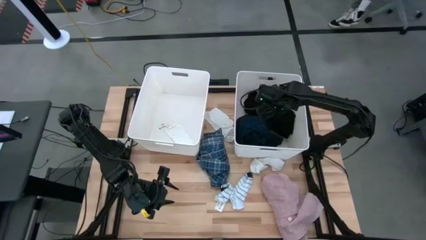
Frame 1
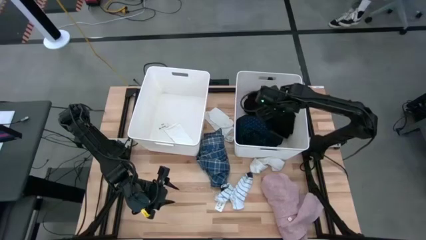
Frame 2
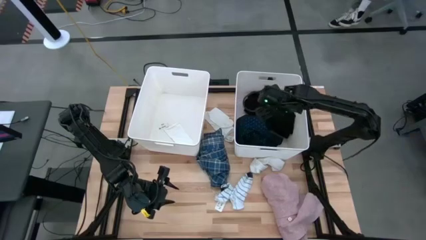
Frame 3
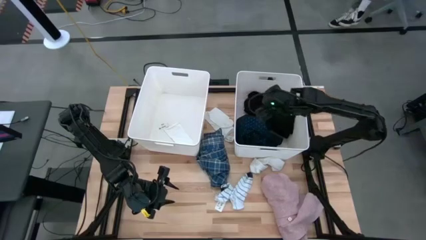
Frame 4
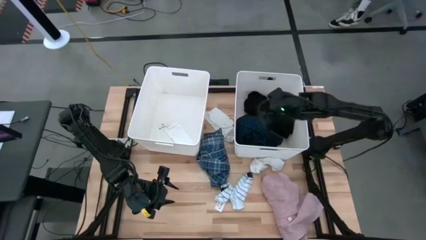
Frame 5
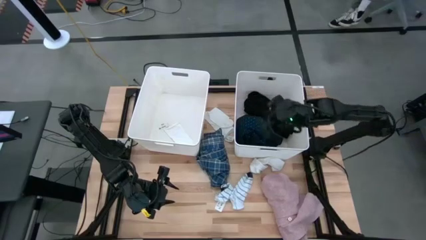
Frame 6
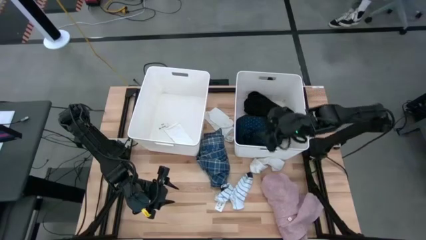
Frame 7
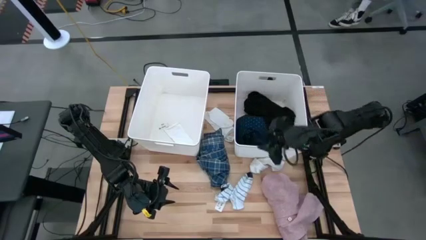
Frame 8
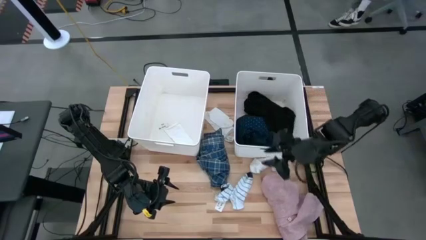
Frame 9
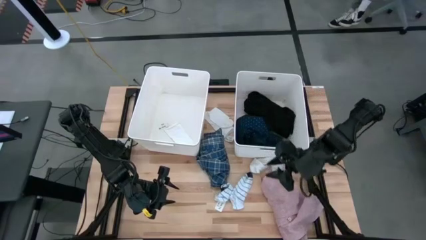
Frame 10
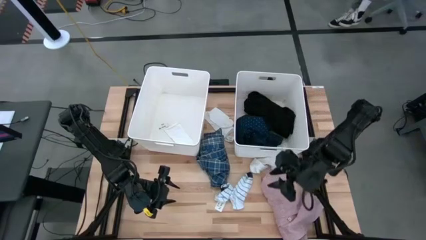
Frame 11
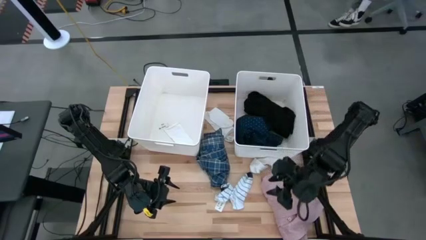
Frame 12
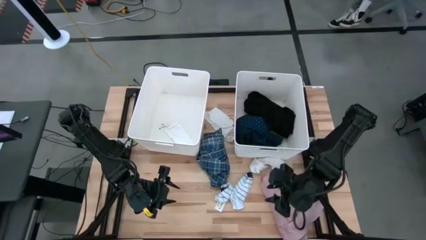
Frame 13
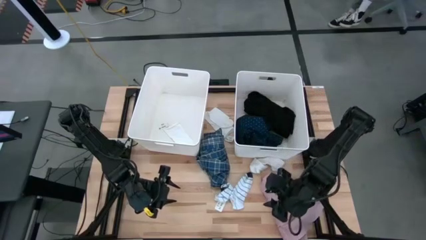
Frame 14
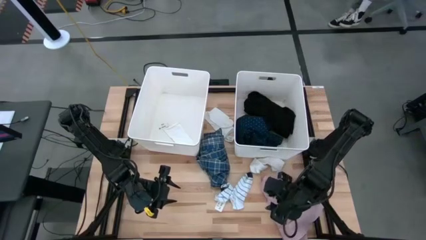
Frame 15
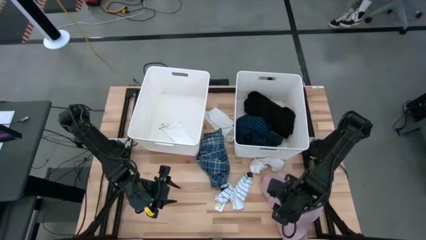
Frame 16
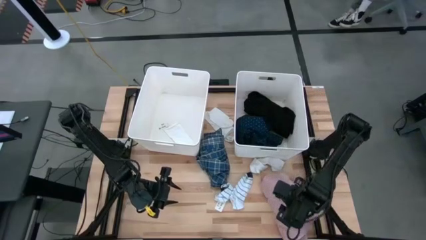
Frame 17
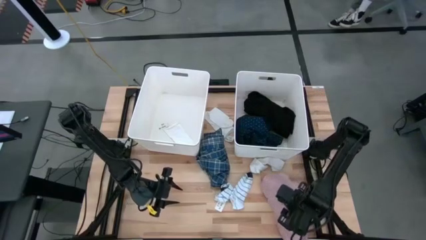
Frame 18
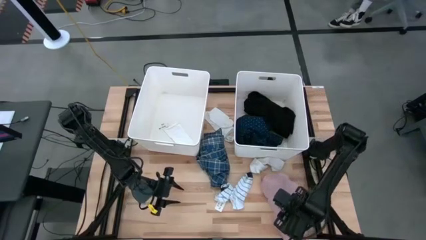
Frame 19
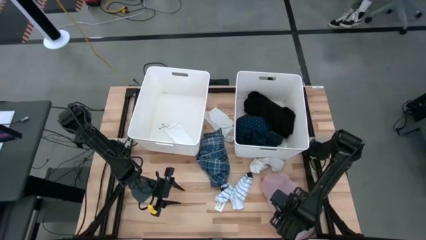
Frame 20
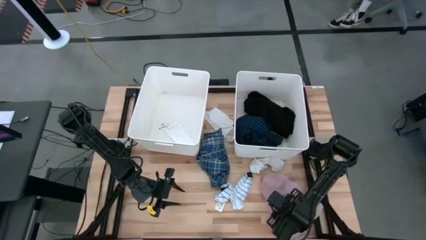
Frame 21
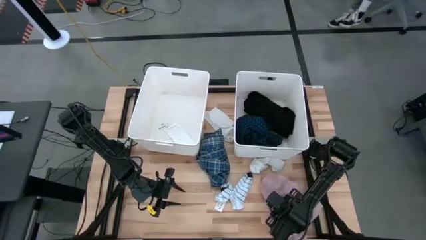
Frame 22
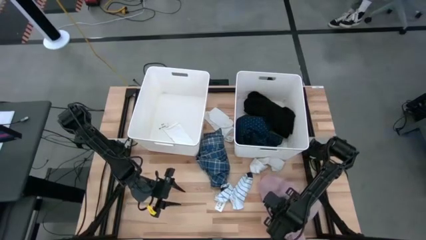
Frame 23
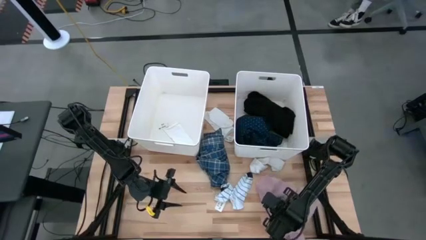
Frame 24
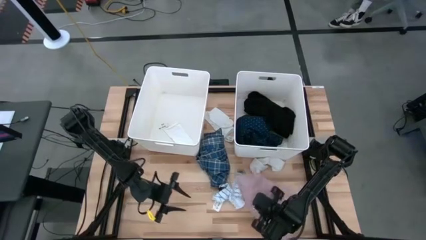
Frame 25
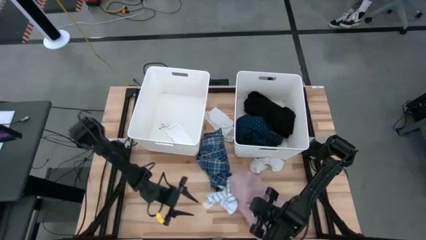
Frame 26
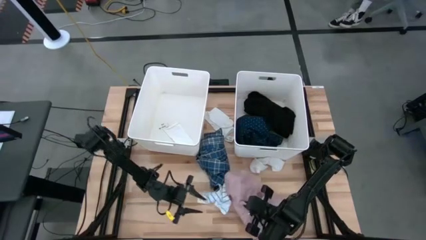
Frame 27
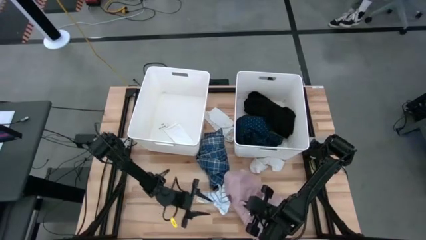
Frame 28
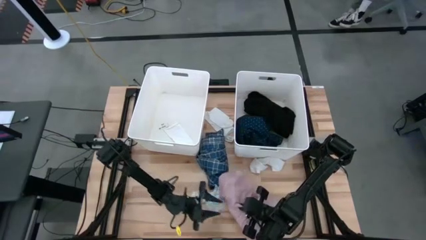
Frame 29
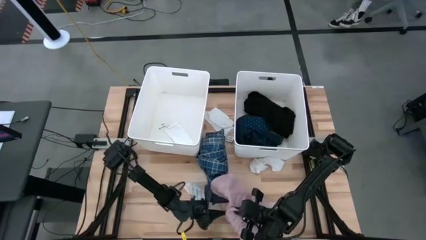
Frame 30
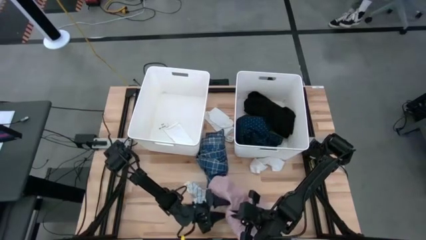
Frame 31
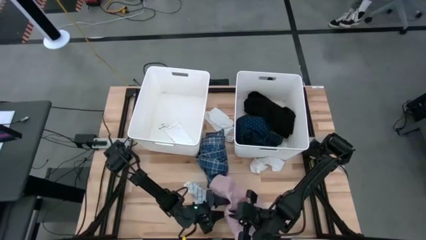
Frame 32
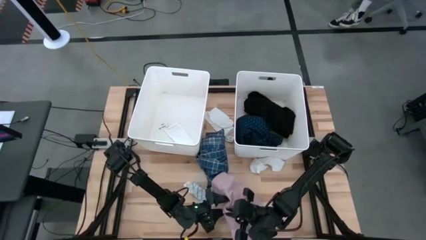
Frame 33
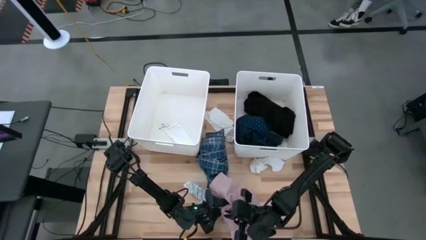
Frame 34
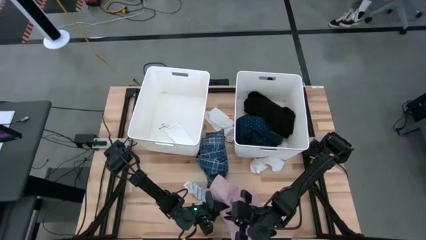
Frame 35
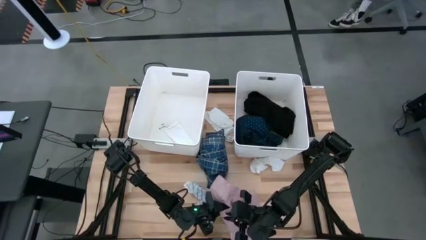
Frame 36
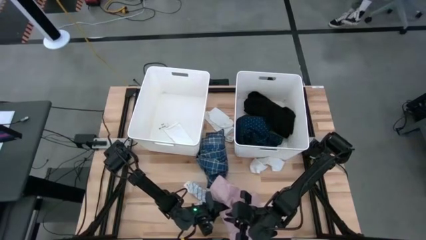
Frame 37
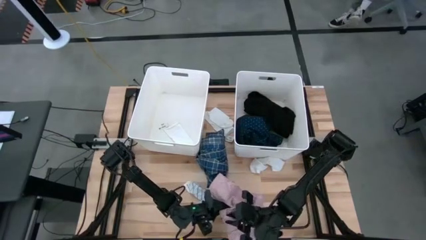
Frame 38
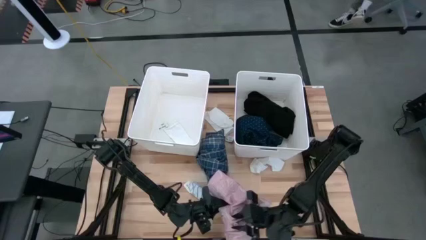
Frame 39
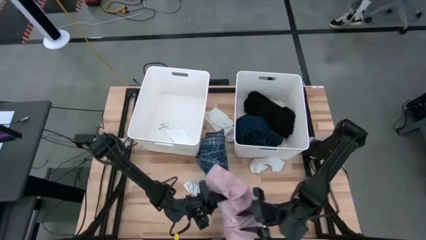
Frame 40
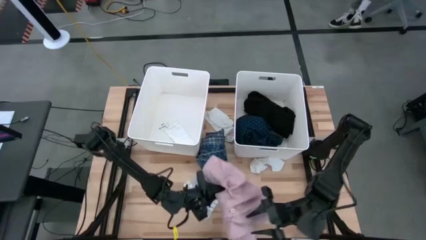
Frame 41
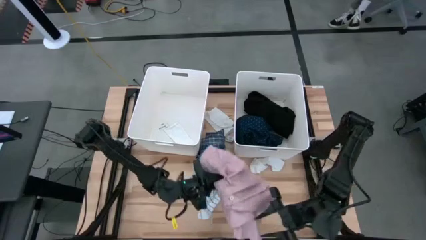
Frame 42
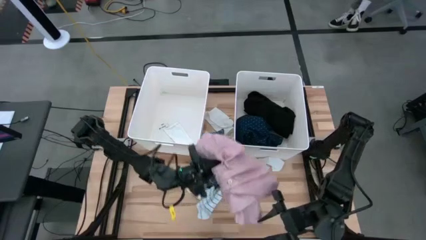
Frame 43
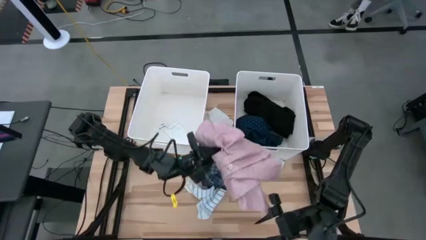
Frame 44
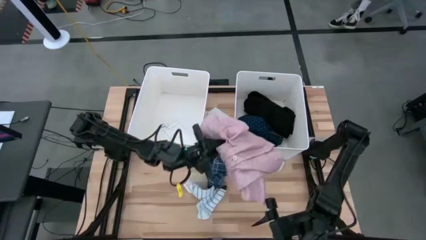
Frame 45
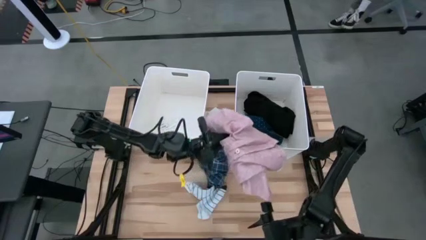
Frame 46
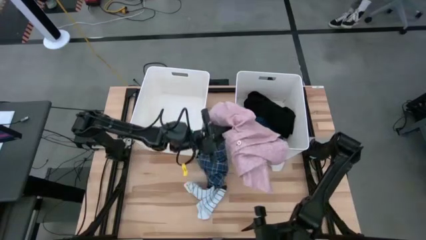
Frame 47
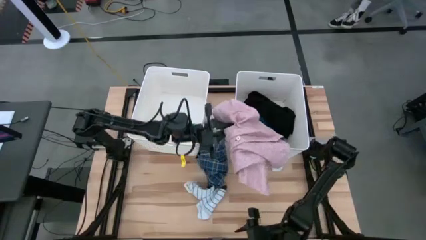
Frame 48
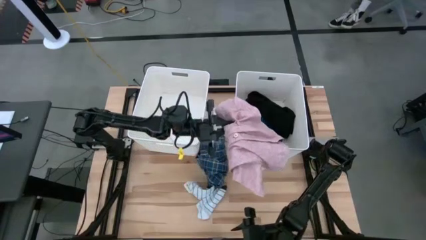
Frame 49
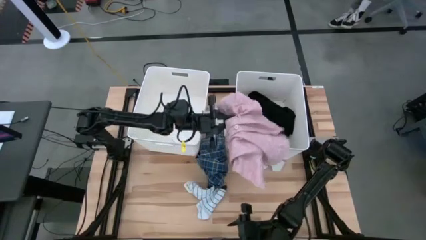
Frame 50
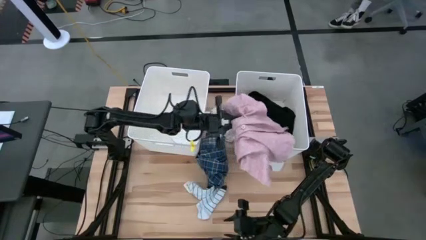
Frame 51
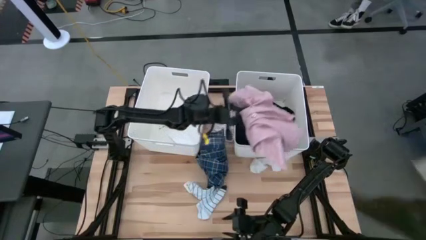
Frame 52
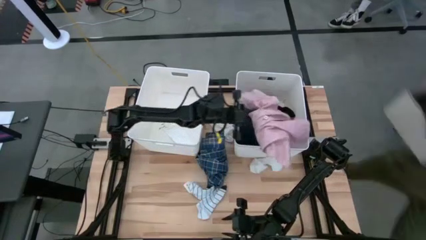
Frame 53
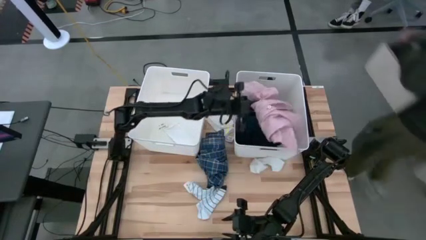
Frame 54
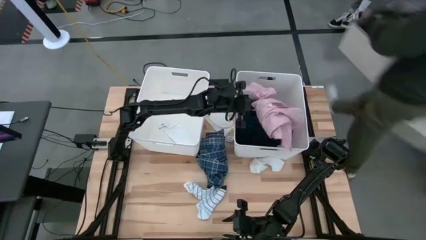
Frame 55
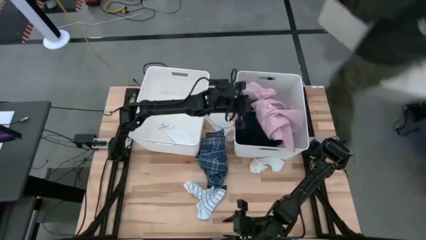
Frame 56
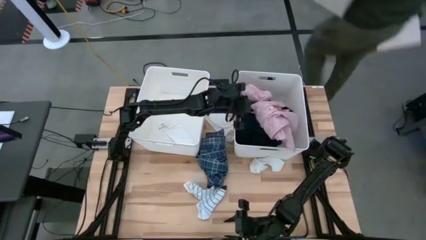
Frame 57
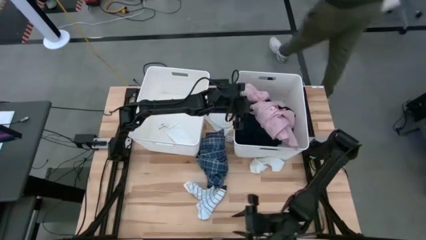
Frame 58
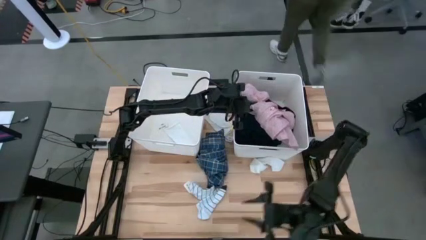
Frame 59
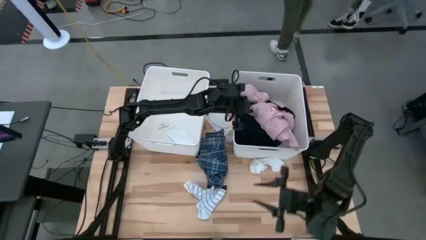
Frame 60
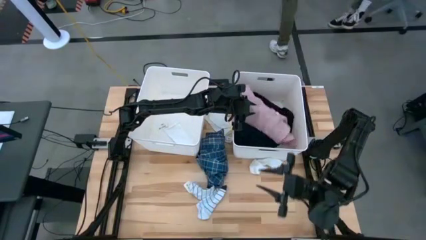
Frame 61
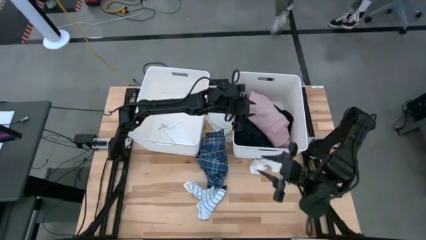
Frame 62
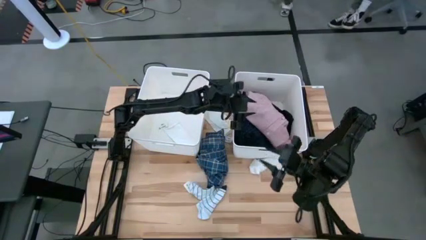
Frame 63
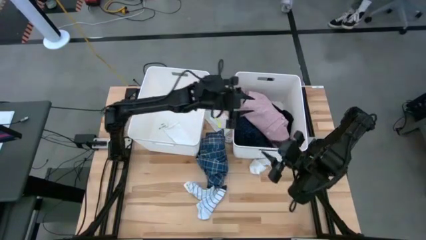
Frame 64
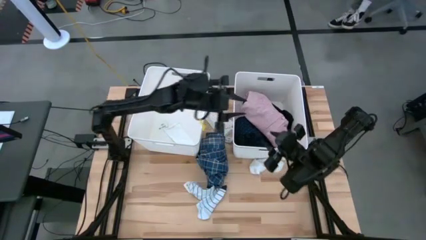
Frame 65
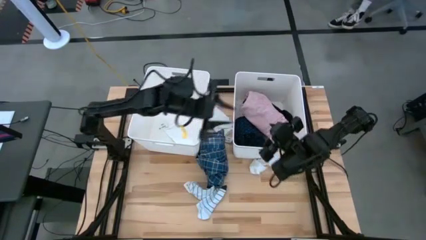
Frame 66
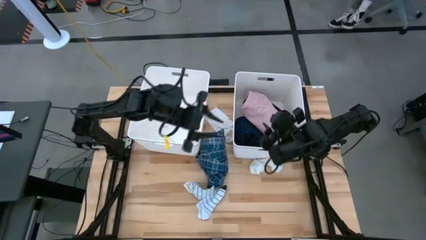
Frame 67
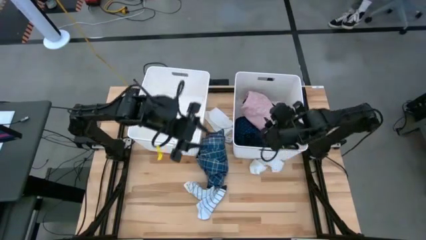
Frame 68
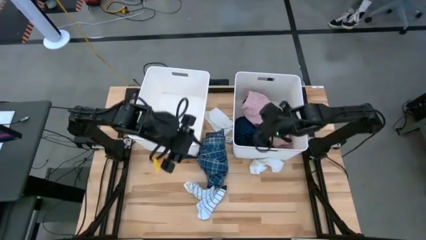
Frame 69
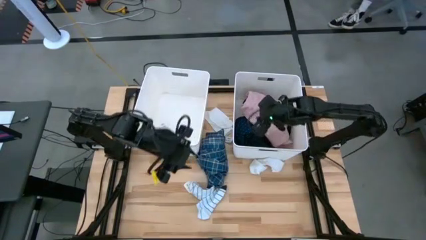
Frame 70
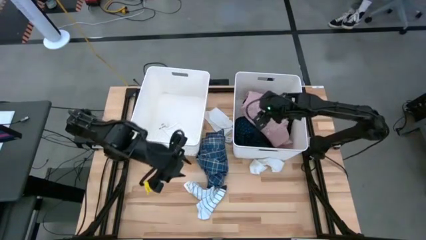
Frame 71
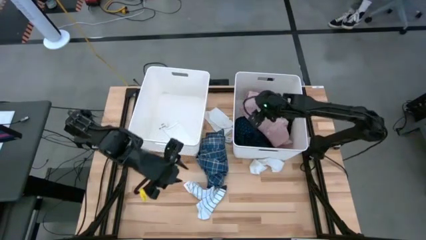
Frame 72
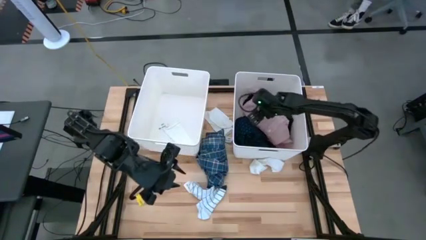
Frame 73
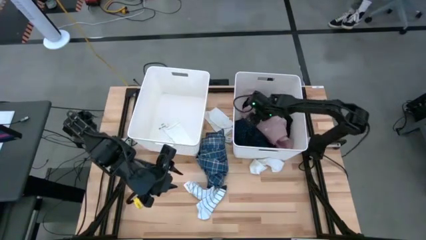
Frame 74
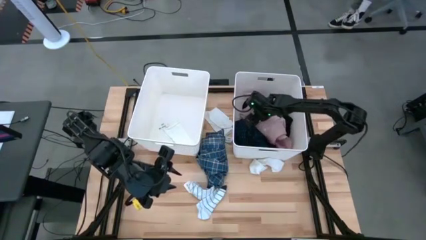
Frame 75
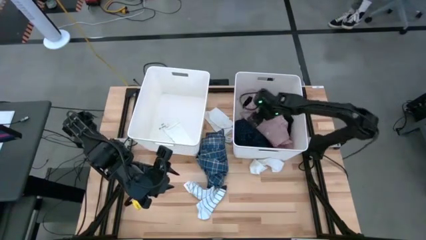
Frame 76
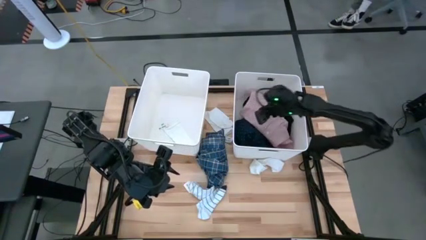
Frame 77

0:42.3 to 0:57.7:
Task: Sort clothes
Put the pink shirt into the right white laundry bin
